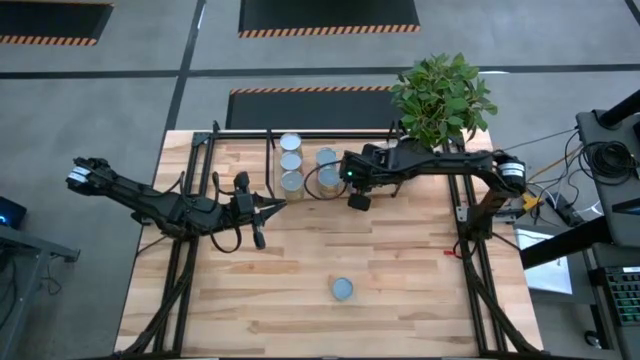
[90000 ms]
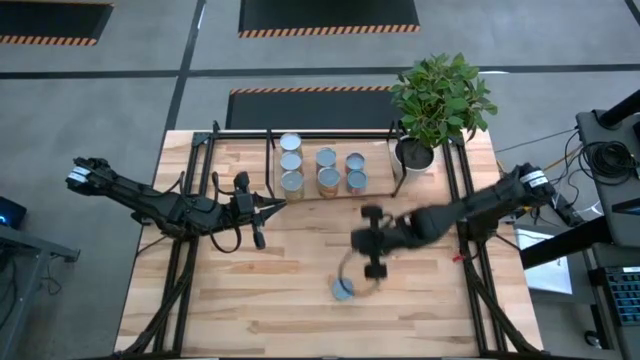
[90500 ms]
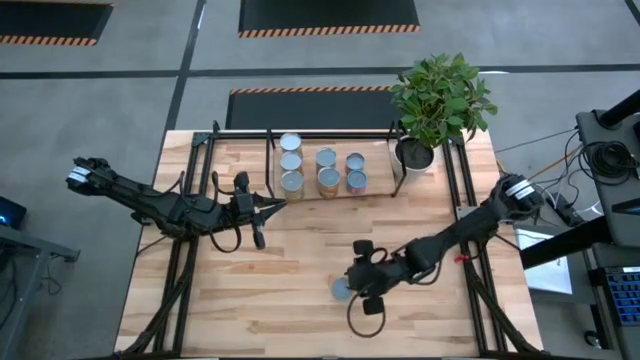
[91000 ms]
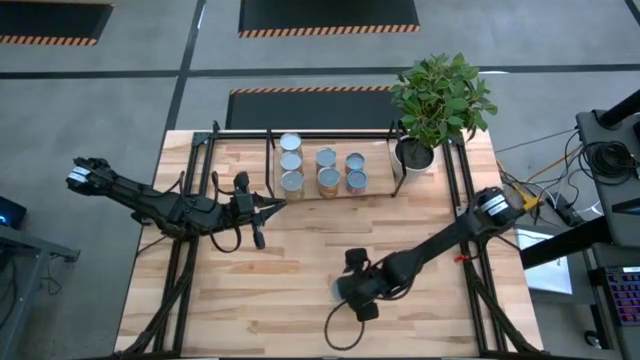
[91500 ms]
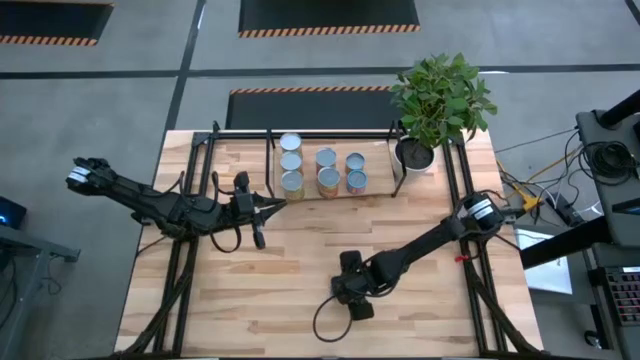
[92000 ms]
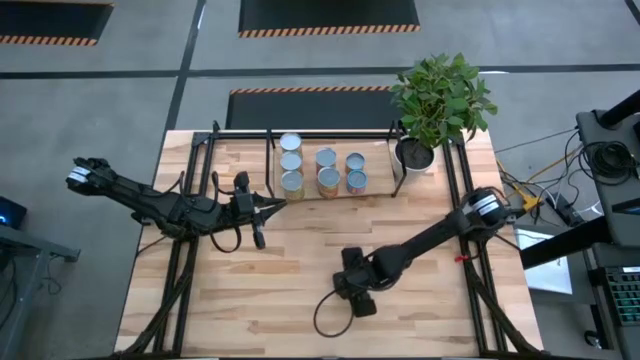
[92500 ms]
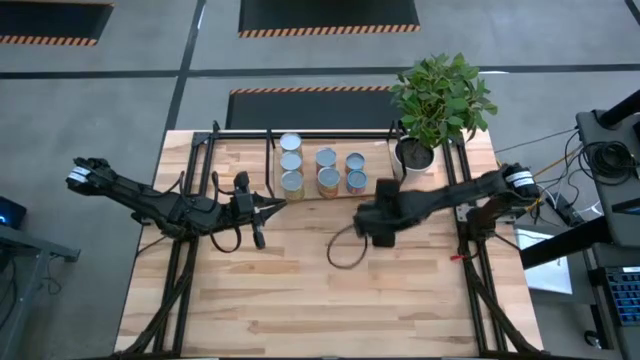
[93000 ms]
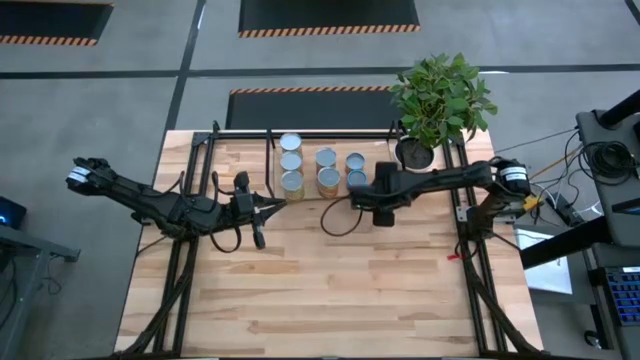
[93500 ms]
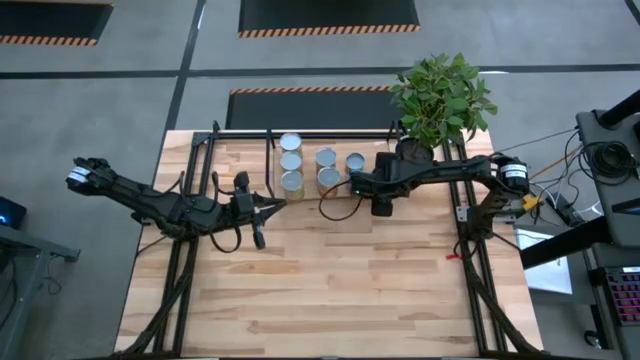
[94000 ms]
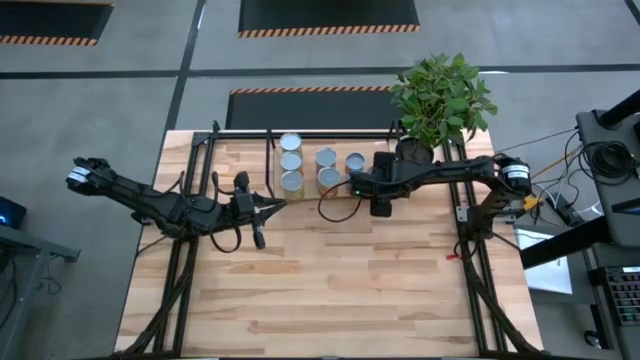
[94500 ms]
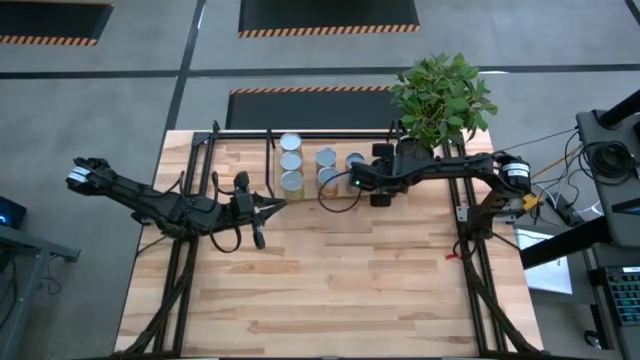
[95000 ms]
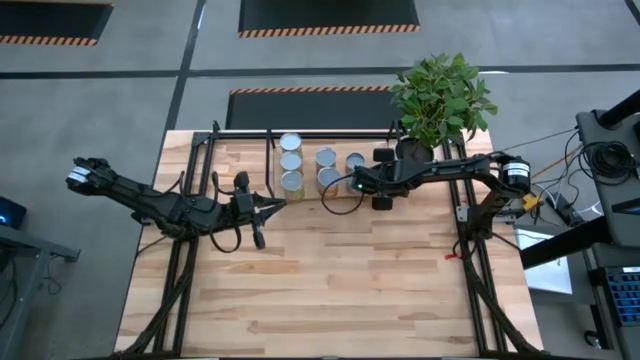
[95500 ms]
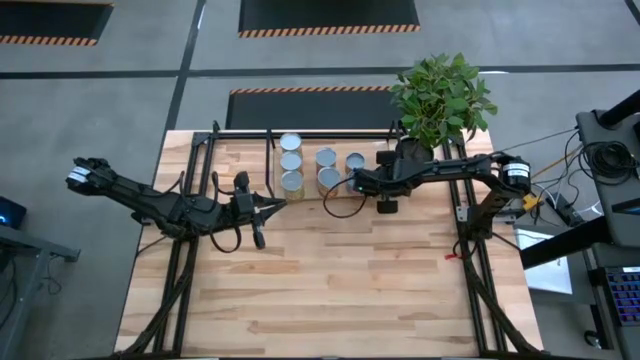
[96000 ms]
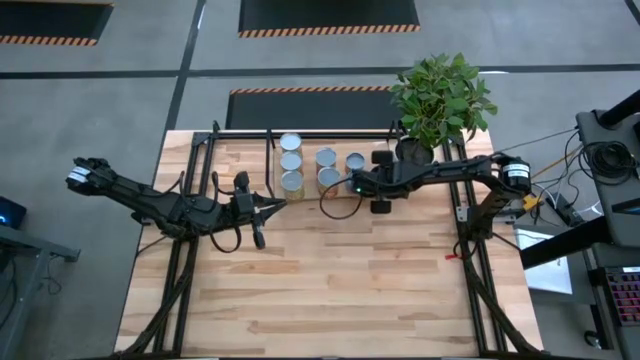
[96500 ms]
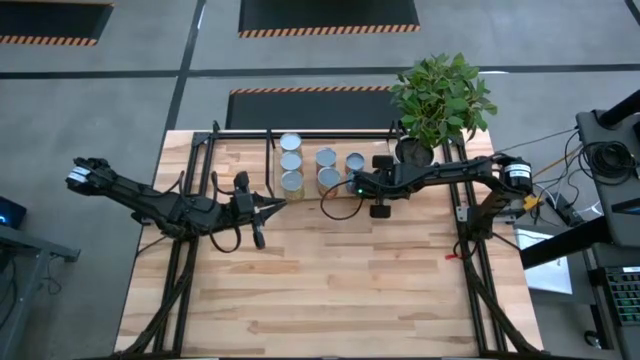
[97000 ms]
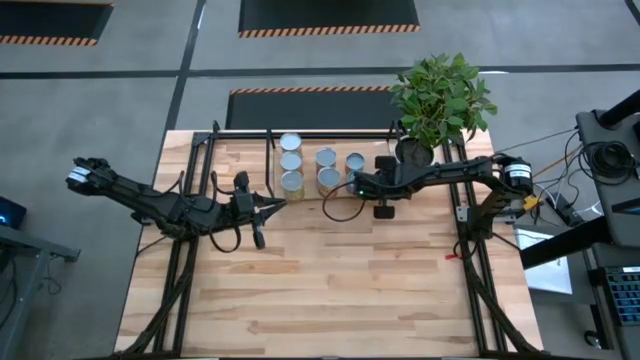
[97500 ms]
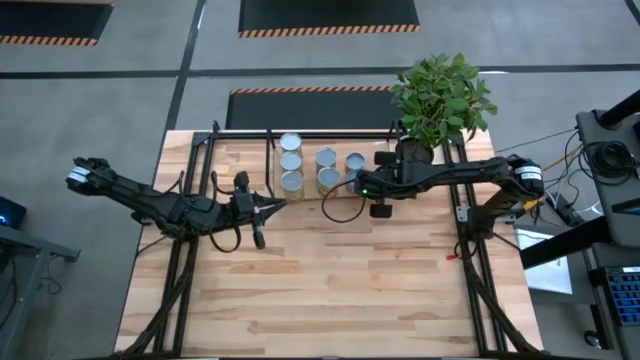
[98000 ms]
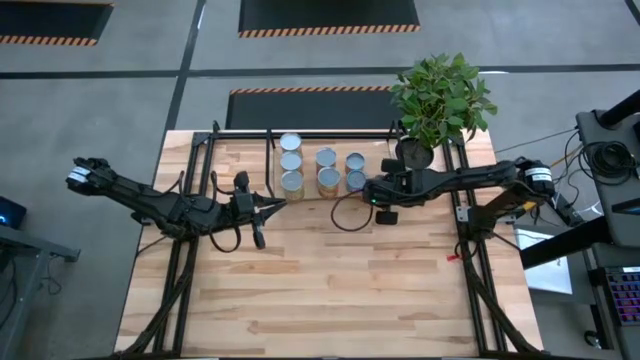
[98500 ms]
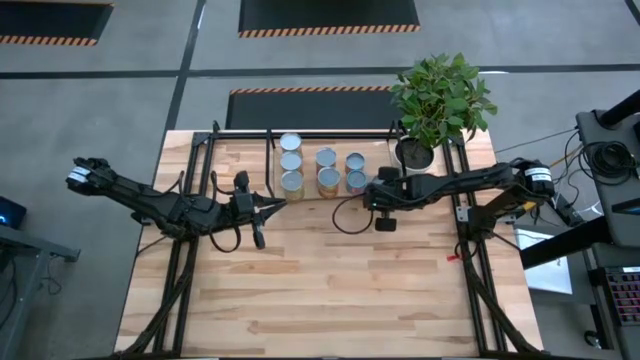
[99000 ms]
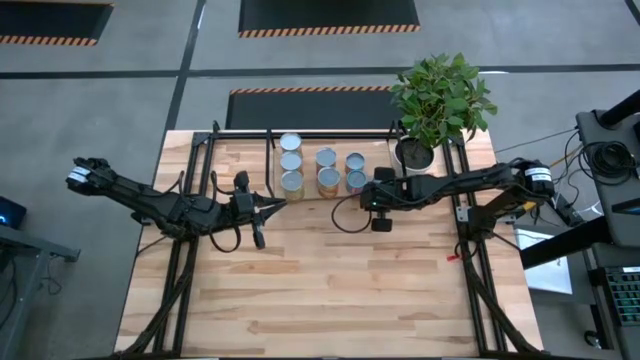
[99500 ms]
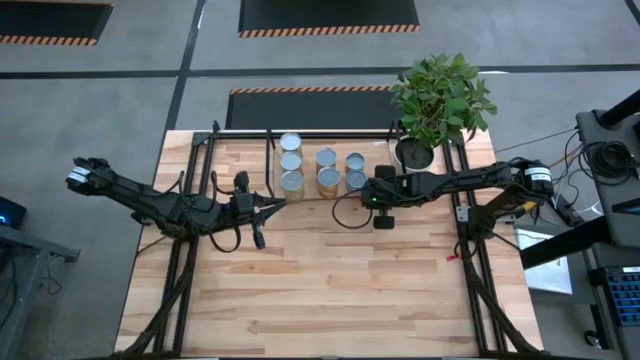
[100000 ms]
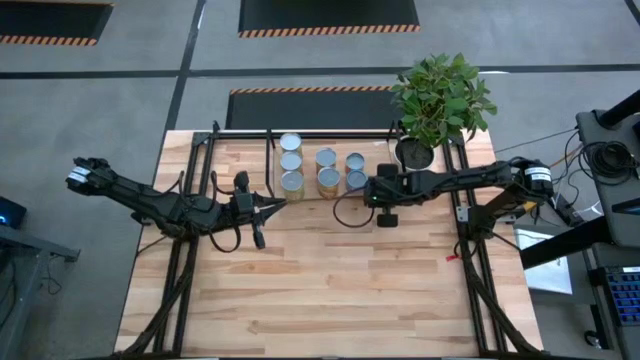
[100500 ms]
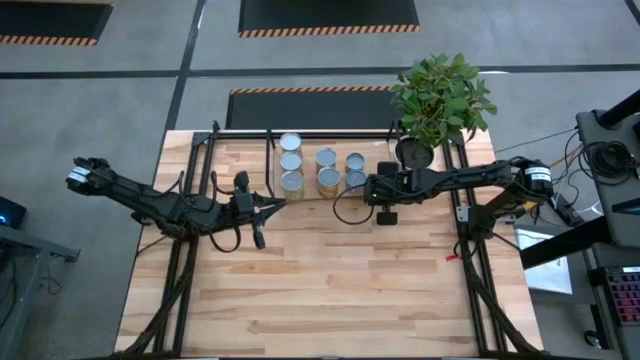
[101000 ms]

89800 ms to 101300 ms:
Task: Pick and place cans onto a shelf
Put the canned mushroom on the shelf

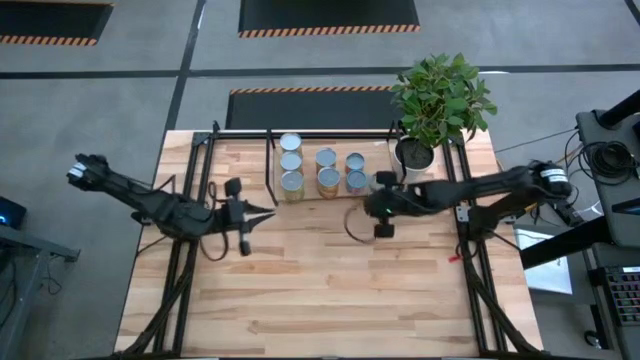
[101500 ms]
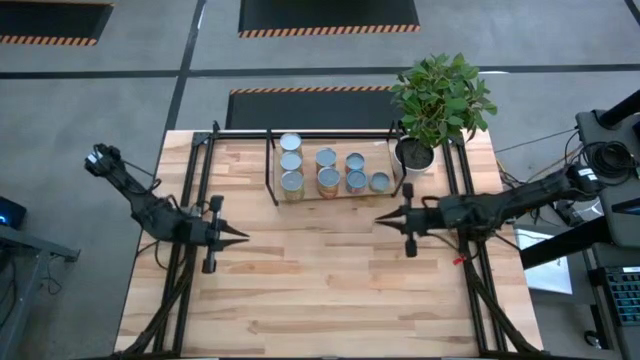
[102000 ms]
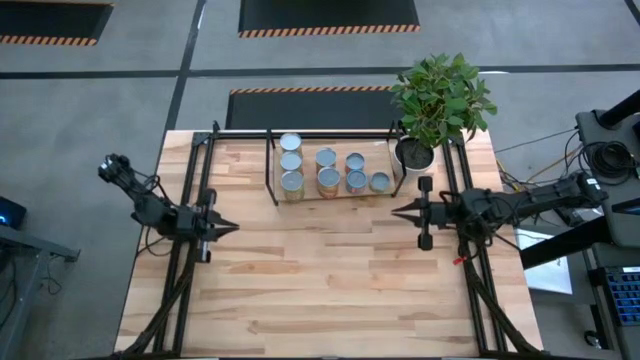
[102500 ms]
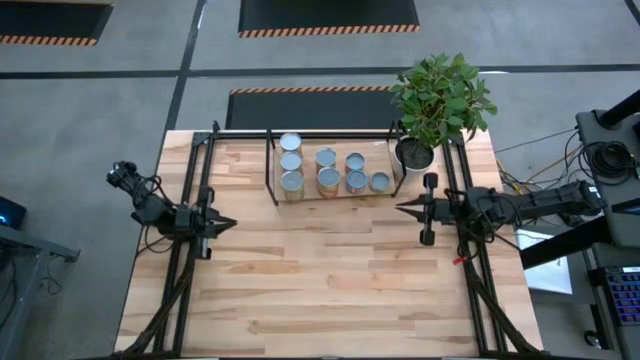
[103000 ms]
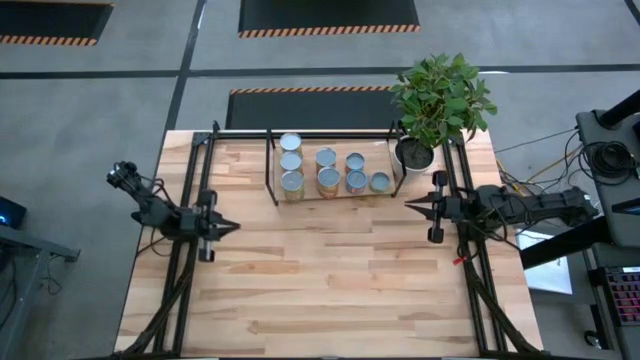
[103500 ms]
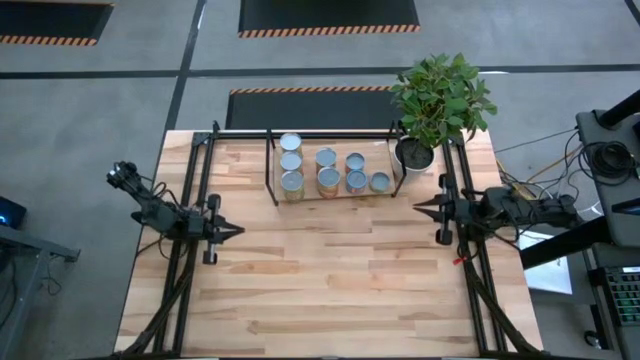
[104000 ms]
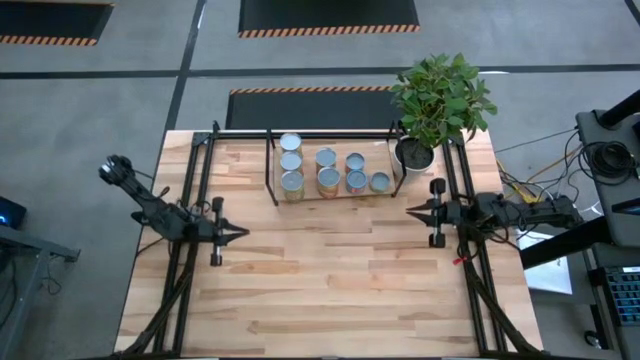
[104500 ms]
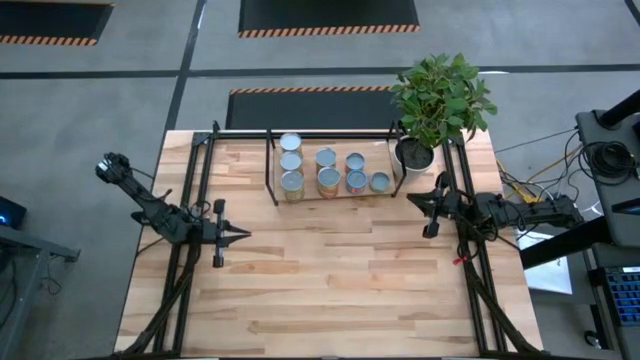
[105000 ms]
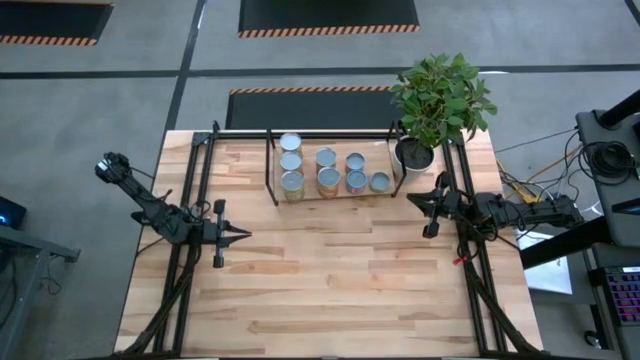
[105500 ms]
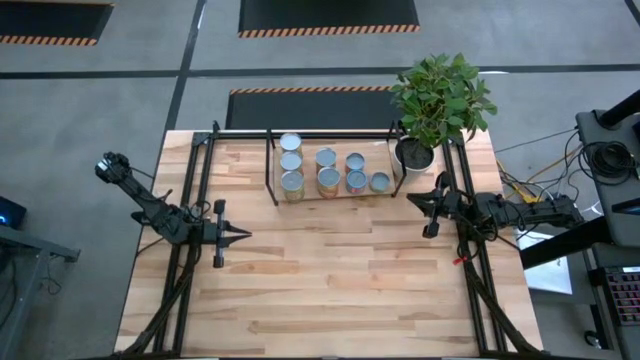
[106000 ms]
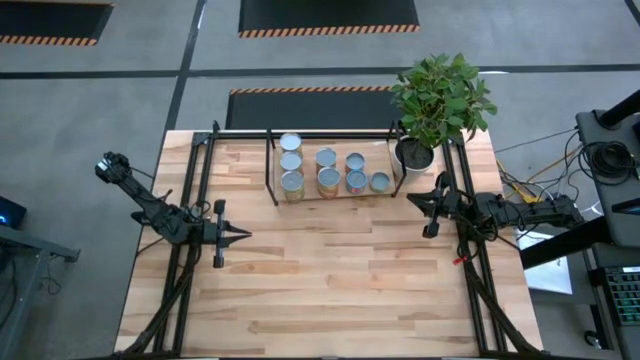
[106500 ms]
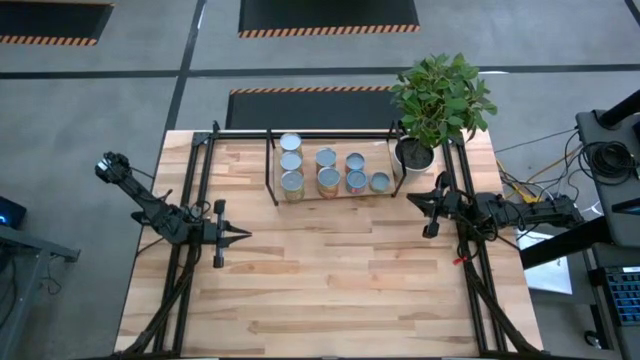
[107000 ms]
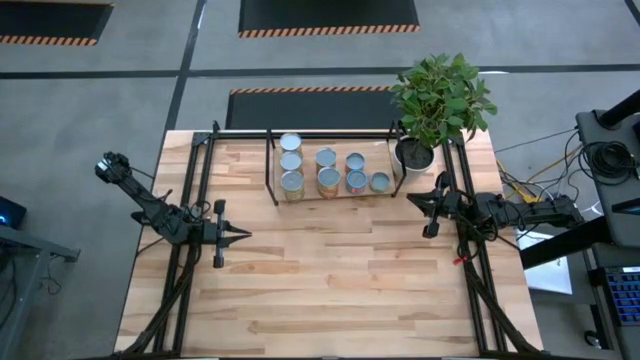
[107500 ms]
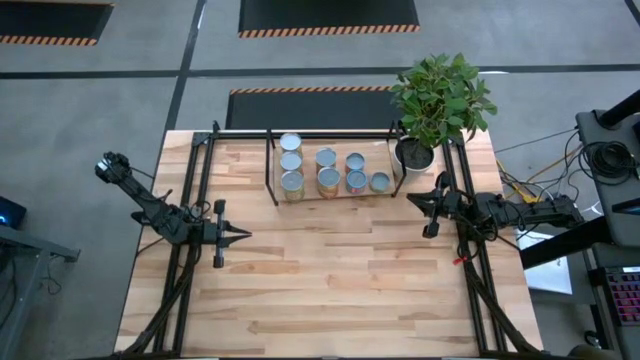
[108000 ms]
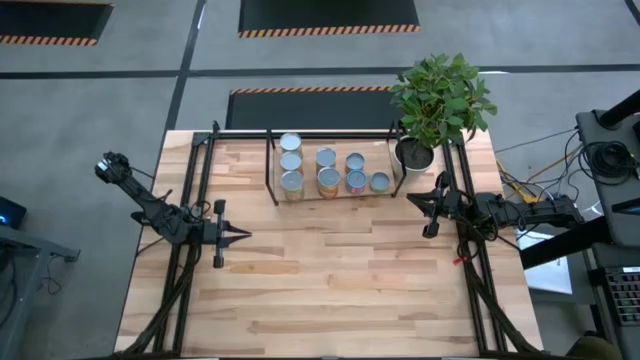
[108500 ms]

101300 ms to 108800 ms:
Return to Home Position

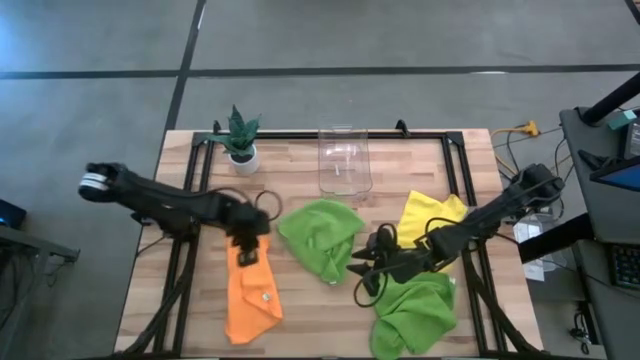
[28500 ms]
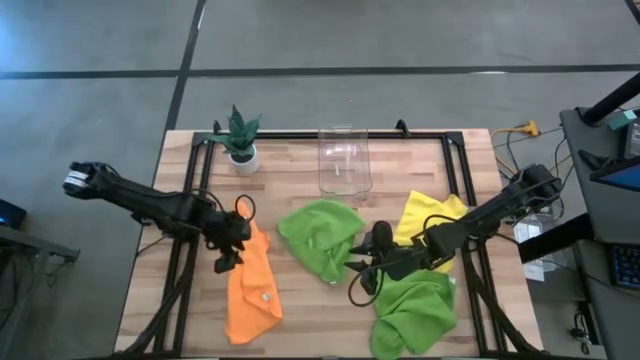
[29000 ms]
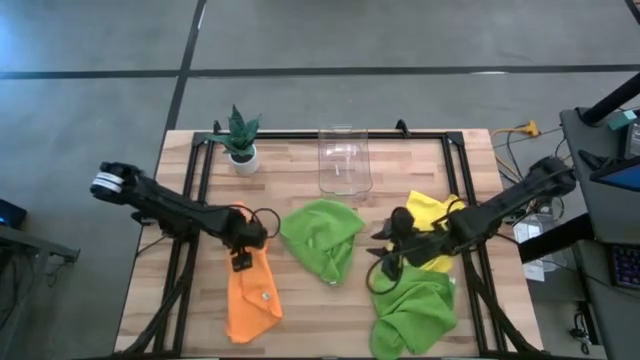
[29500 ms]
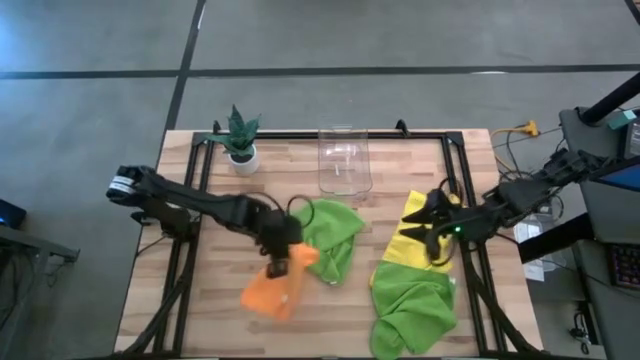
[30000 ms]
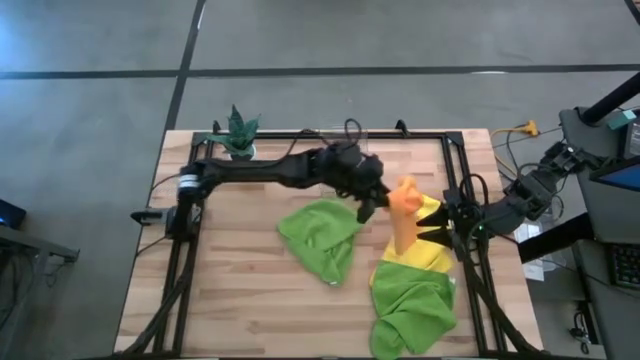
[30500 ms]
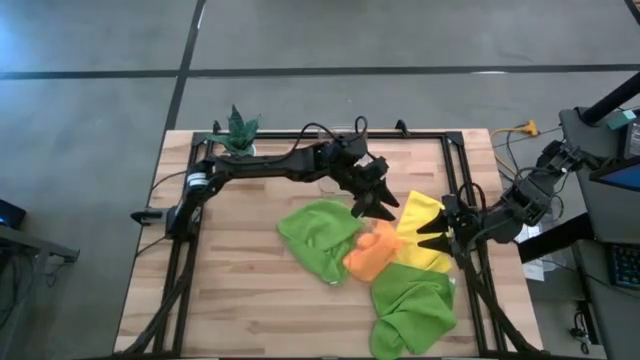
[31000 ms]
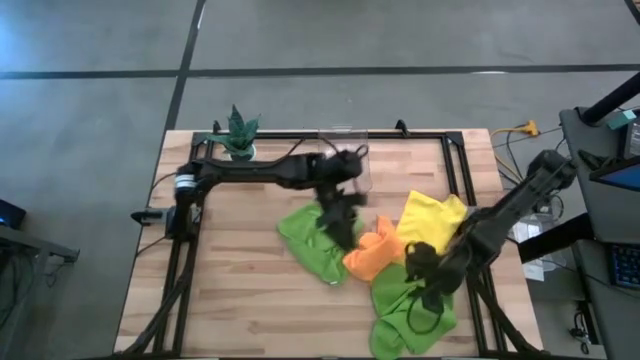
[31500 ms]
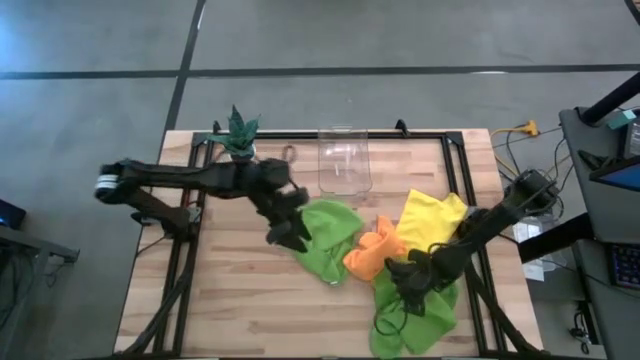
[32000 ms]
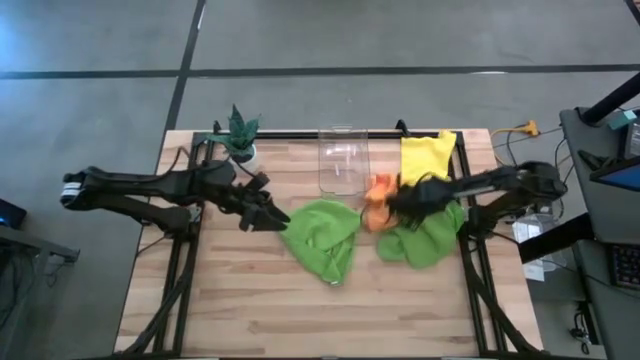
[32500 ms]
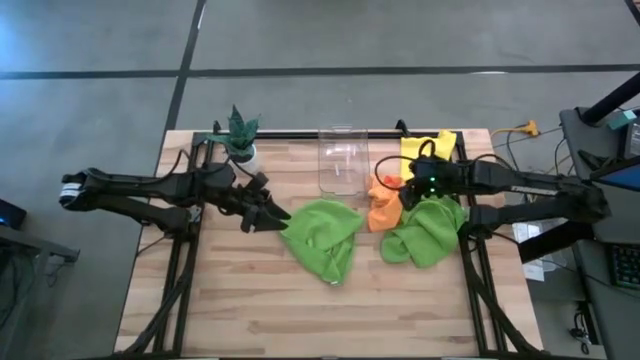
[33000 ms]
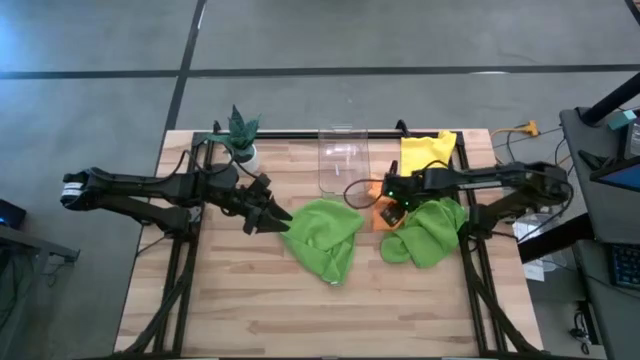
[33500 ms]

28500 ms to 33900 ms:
Task: Fold microfiber towels
Move the towels to the top right
